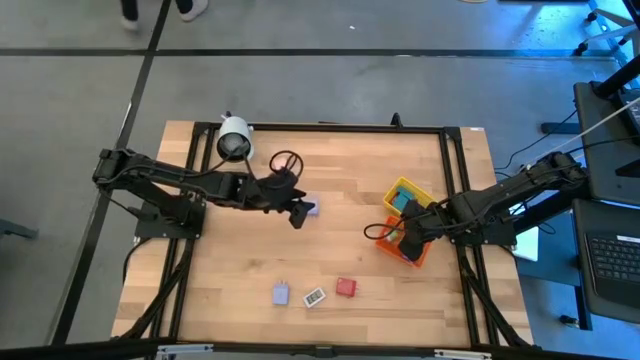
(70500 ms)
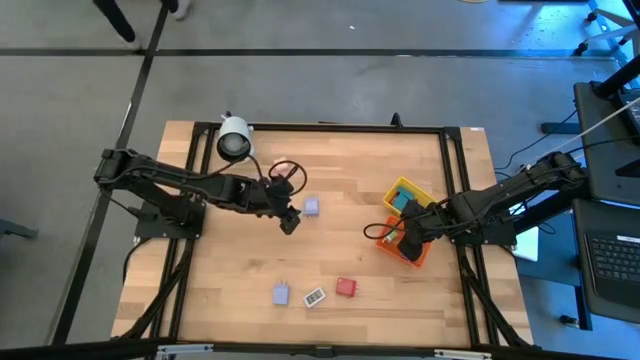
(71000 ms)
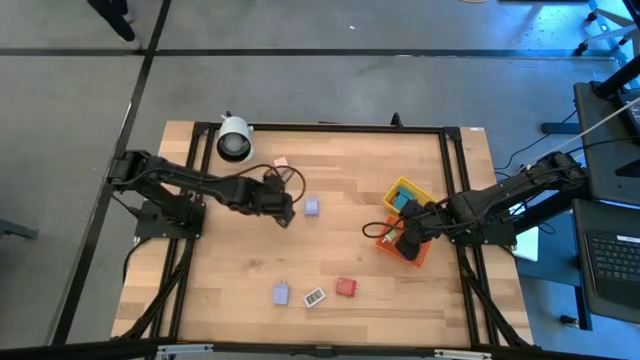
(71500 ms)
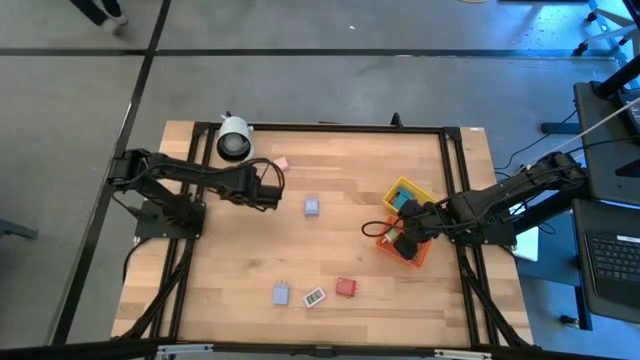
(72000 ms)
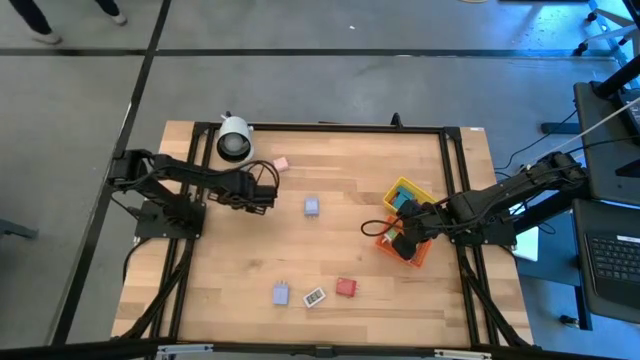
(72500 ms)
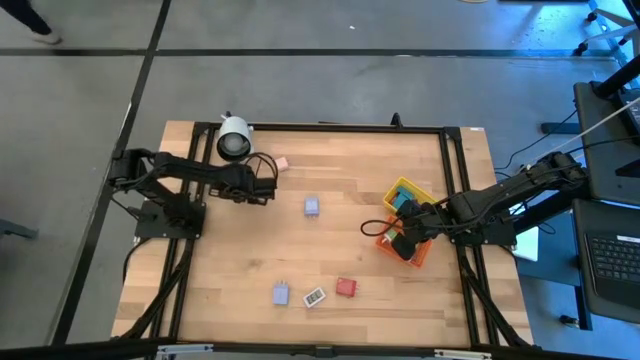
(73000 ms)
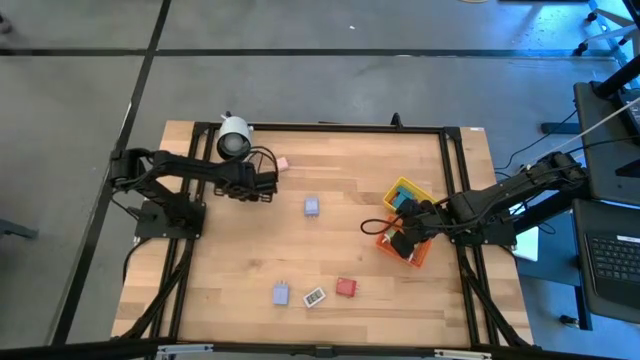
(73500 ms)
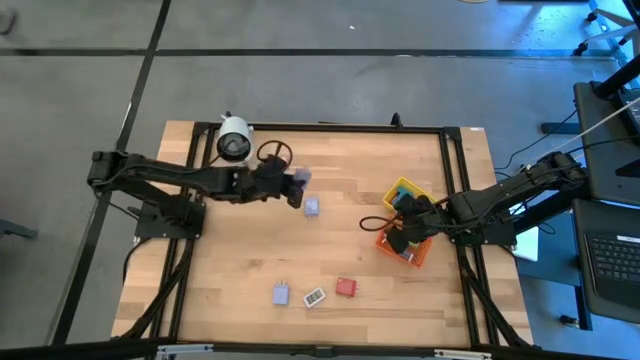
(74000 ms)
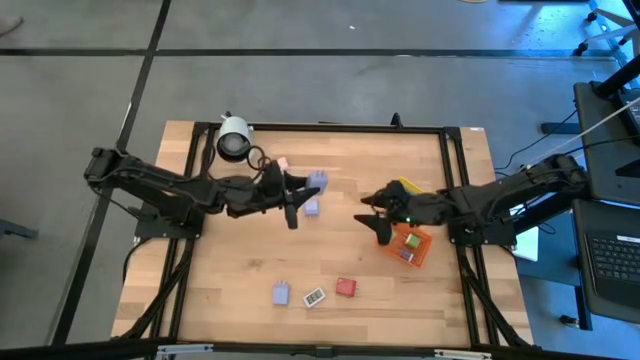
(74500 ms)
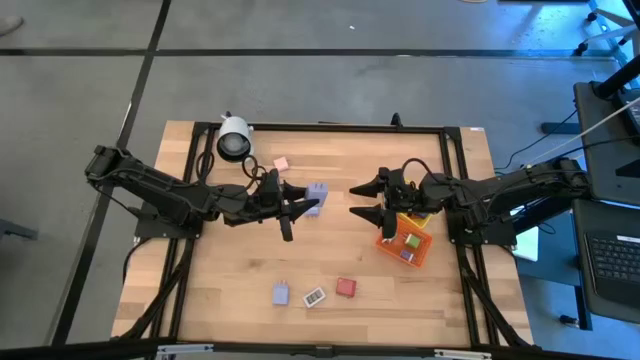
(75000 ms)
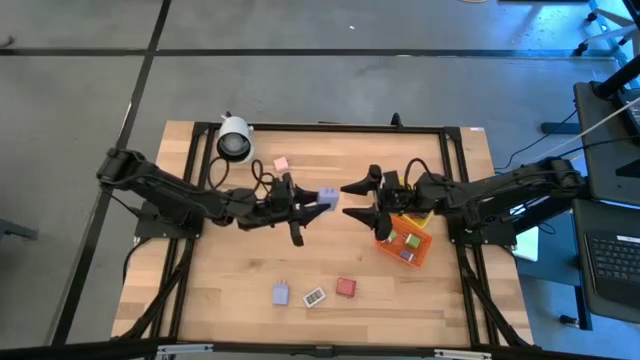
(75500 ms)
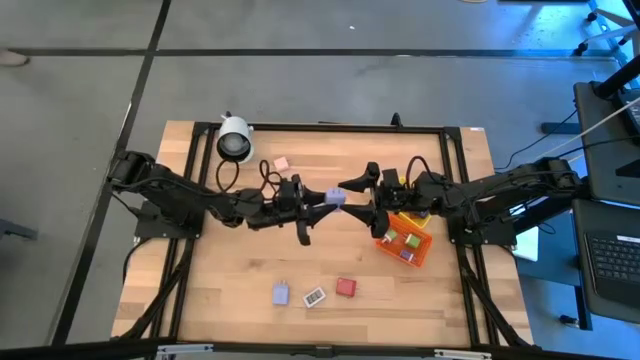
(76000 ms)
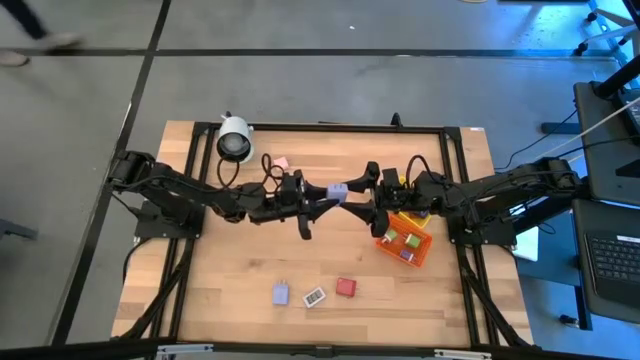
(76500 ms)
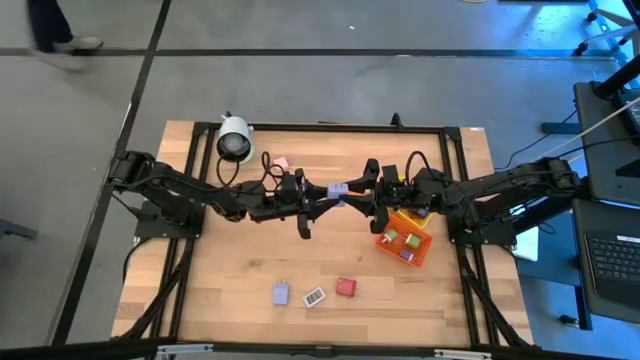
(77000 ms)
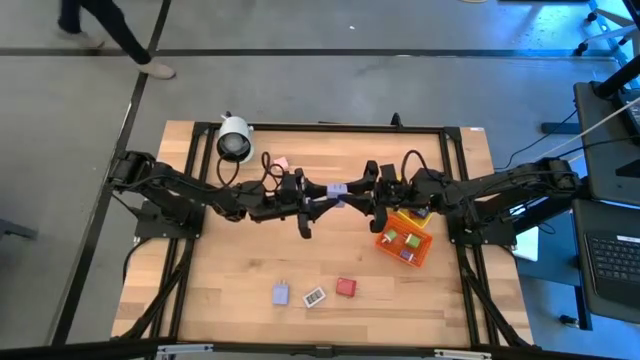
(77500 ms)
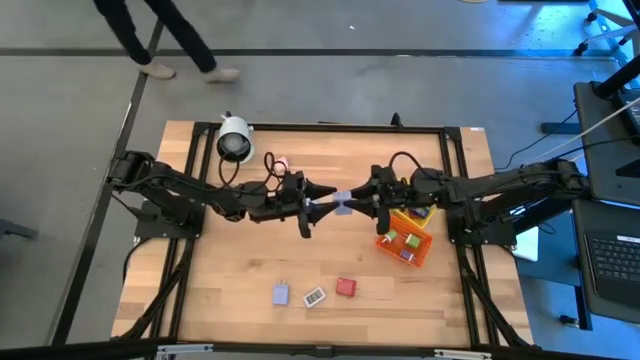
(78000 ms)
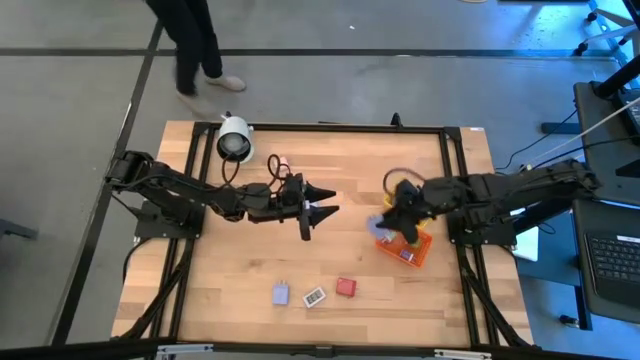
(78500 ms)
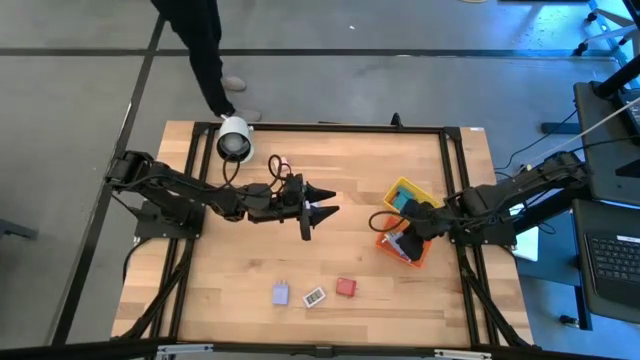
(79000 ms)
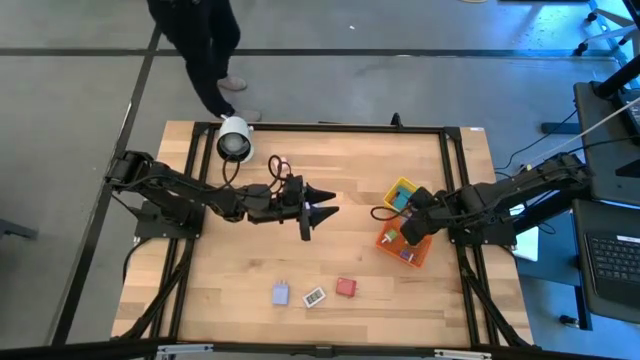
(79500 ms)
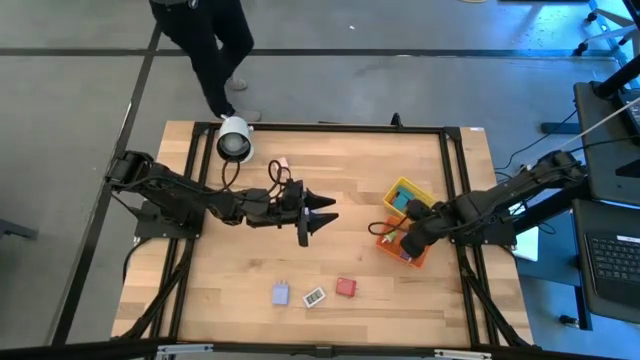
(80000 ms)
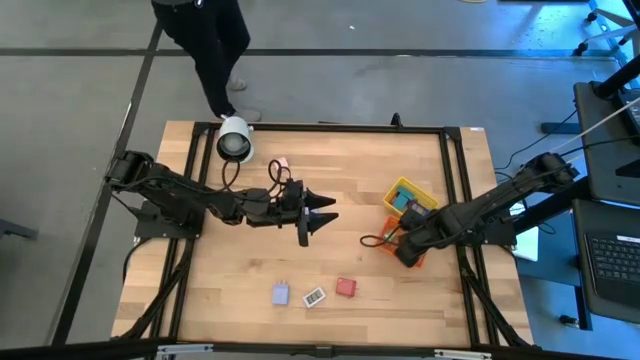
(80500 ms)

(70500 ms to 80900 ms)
Task: Pick & Place Office items
Put the top left light blue charger adapter into the orange basket

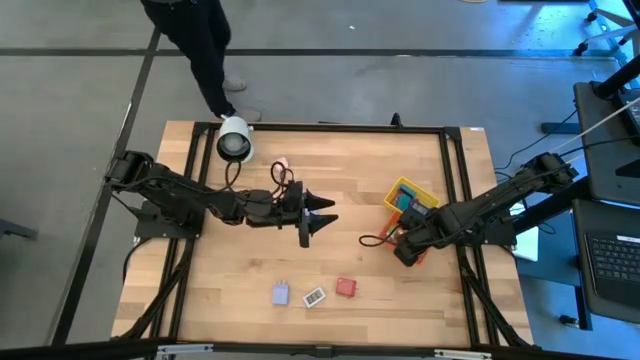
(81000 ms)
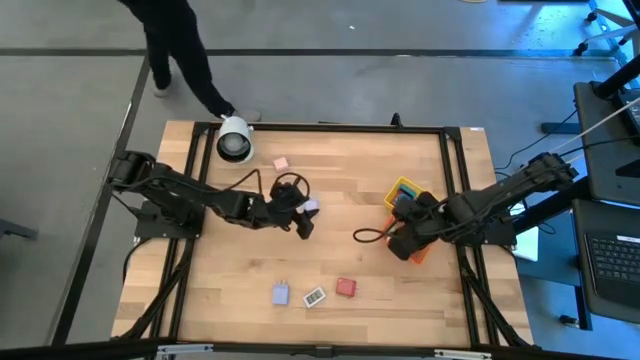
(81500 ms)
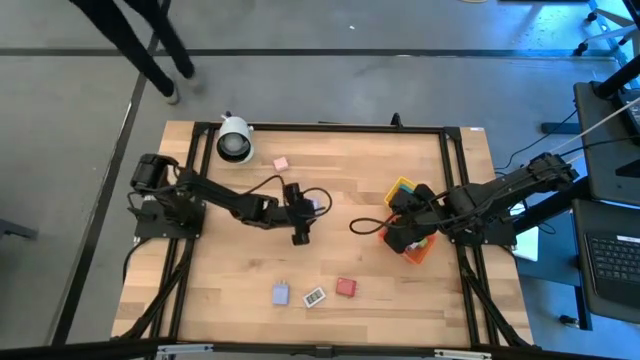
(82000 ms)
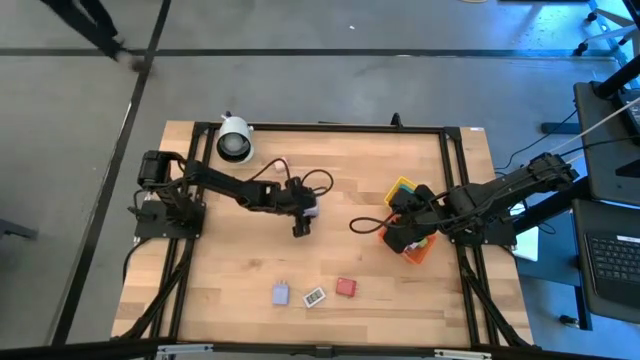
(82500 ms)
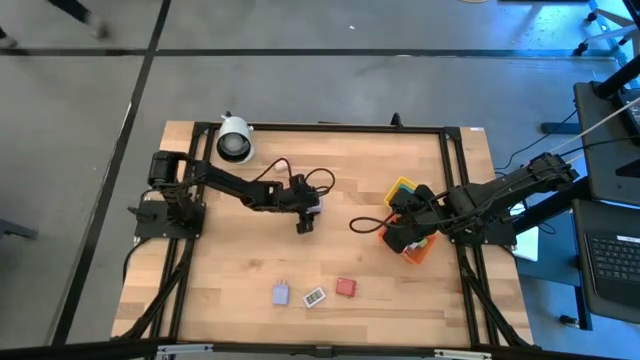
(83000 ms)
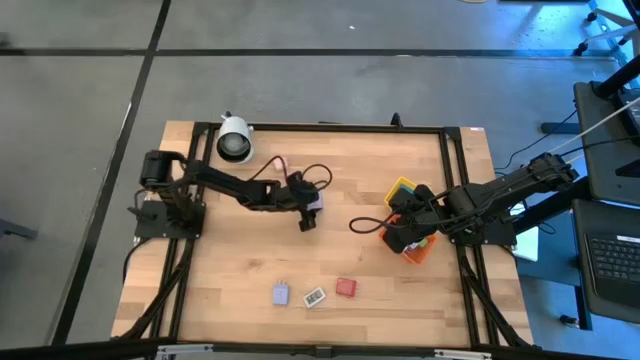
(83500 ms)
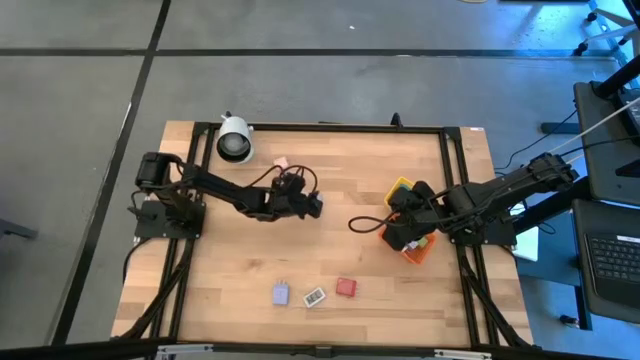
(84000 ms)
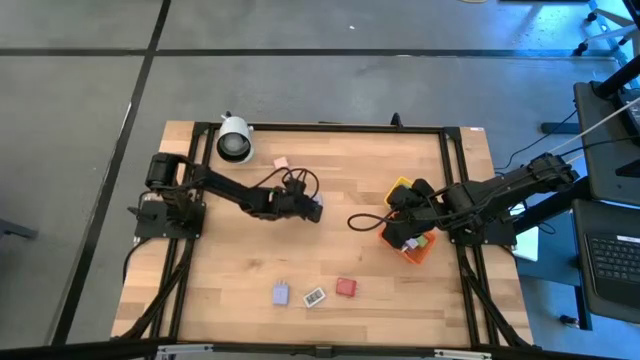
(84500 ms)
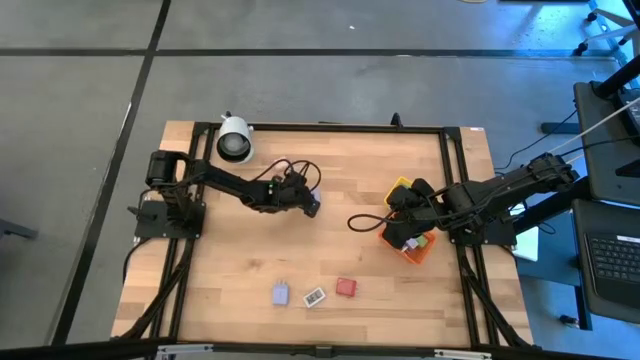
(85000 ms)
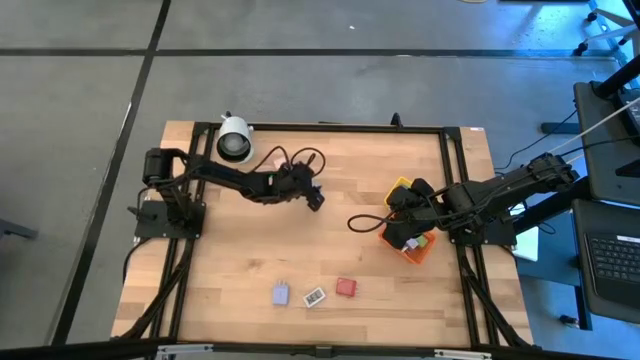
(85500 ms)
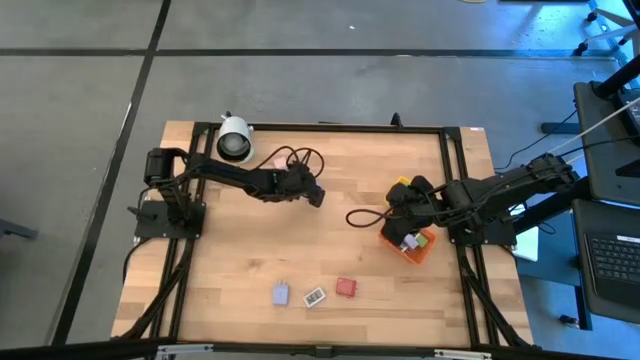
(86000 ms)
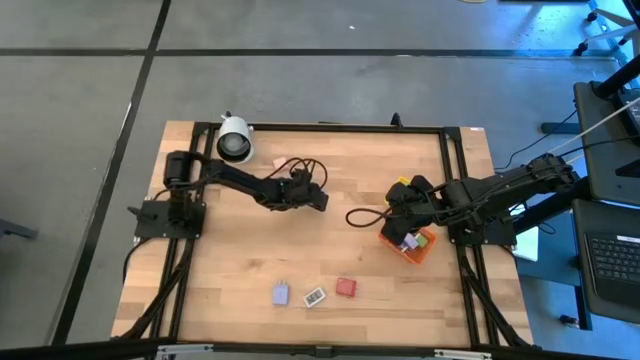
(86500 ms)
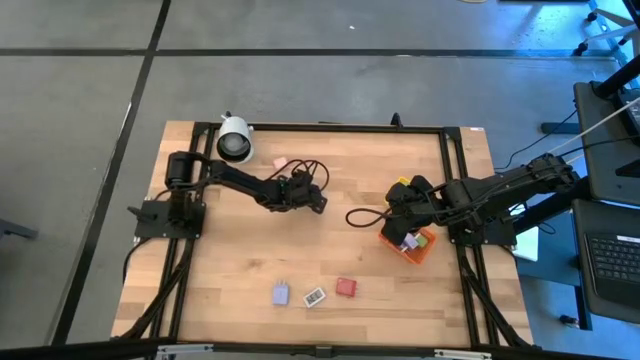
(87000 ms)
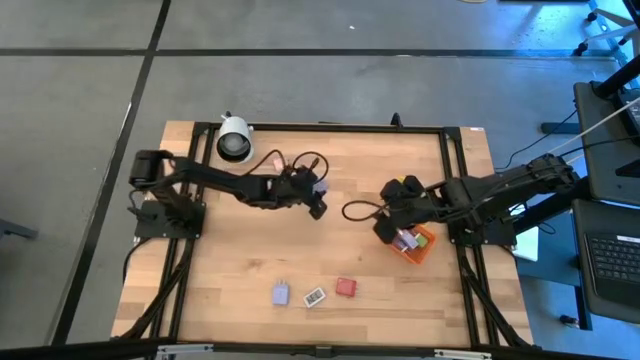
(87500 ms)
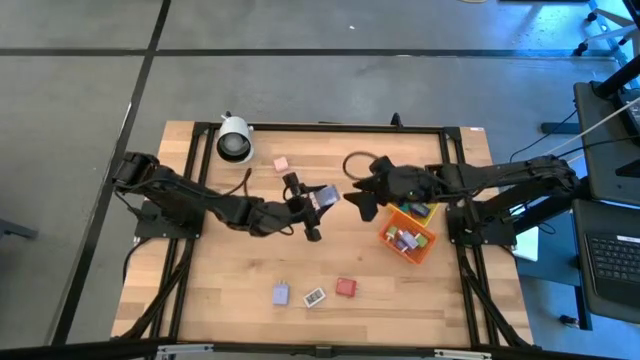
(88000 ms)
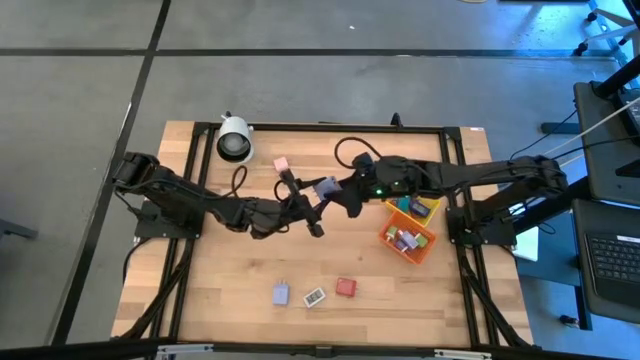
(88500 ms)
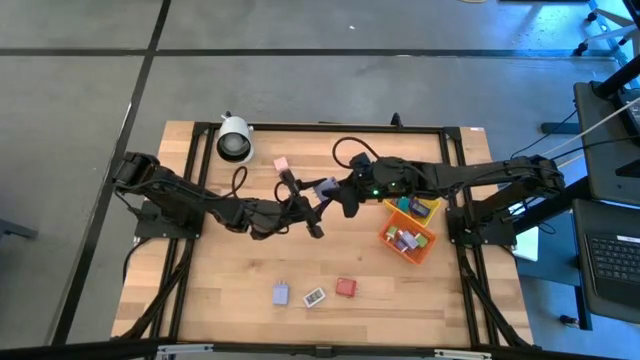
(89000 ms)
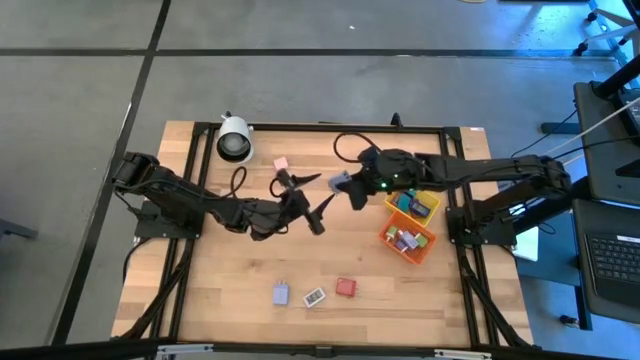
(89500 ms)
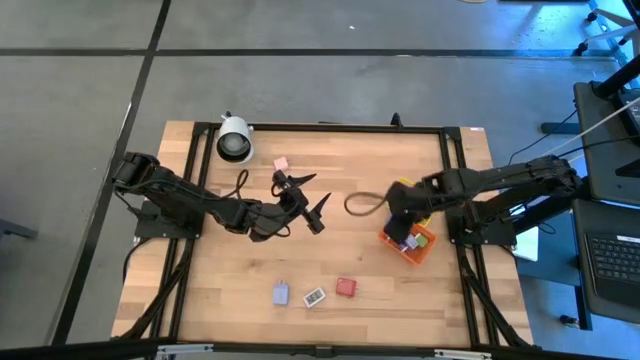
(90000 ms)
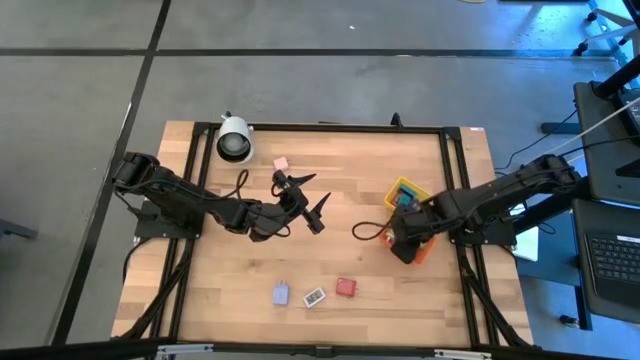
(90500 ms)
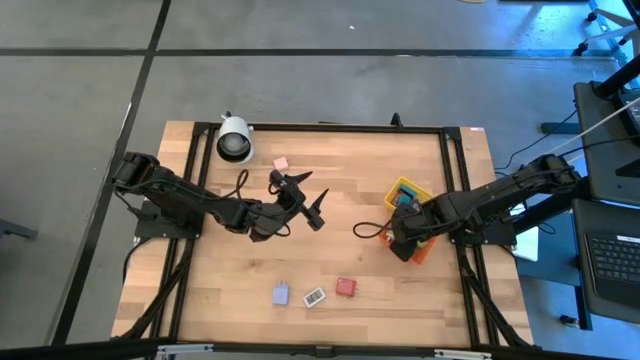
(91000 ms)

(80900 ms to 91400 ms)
Put the top light blue charger adapter into the orange basket
